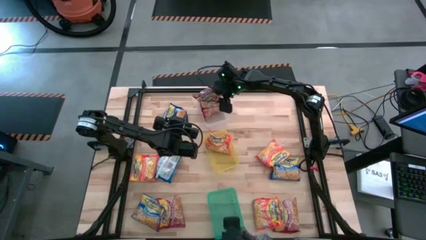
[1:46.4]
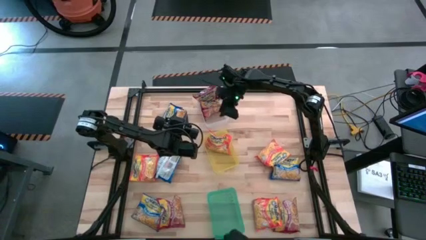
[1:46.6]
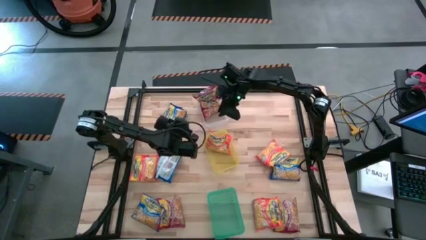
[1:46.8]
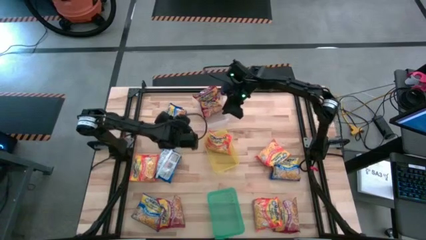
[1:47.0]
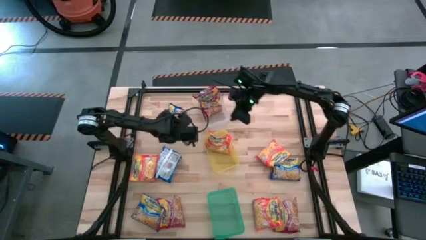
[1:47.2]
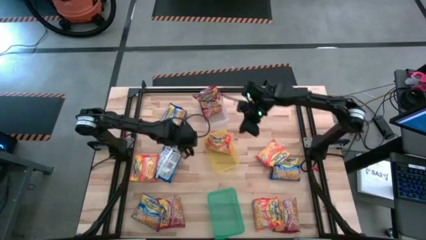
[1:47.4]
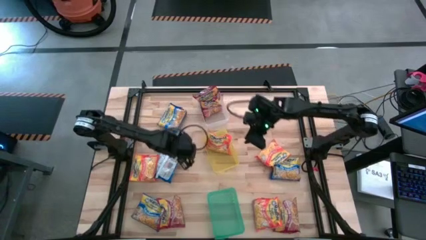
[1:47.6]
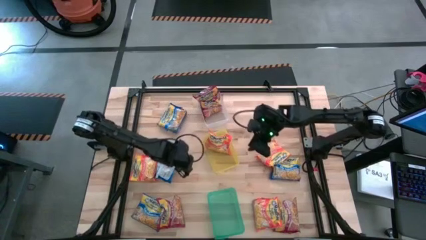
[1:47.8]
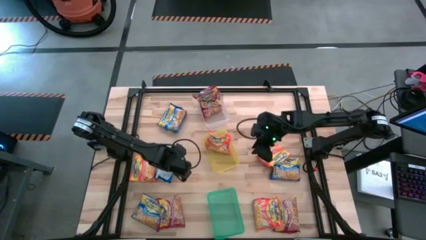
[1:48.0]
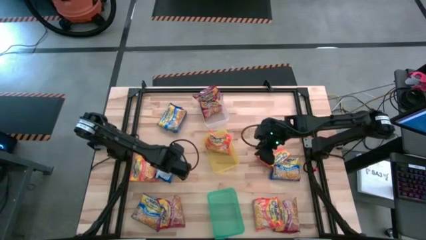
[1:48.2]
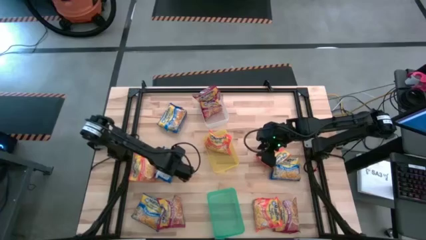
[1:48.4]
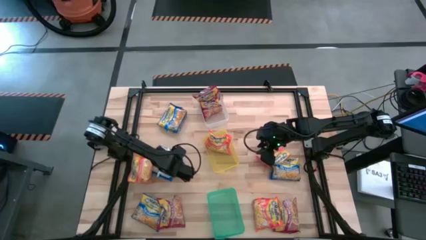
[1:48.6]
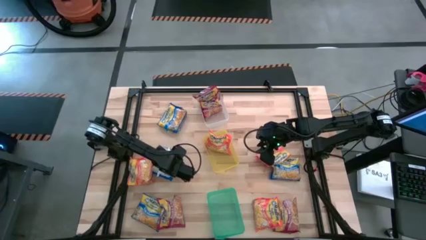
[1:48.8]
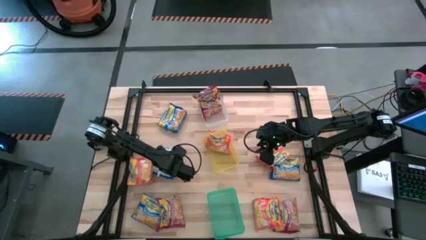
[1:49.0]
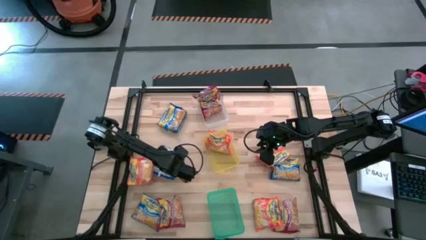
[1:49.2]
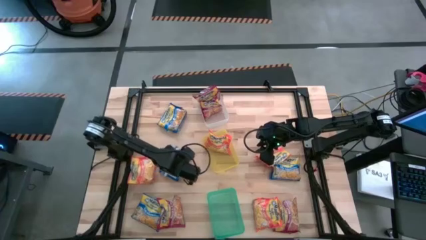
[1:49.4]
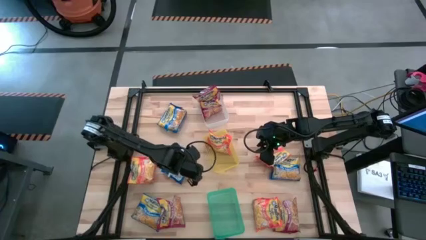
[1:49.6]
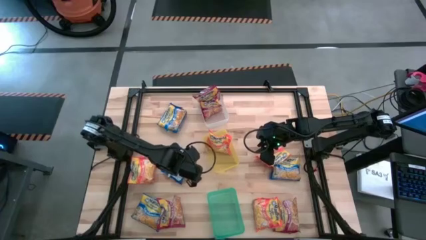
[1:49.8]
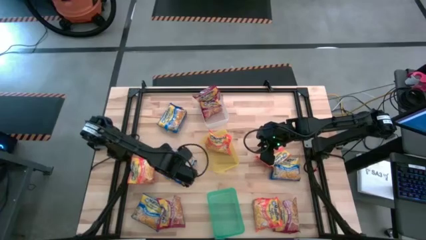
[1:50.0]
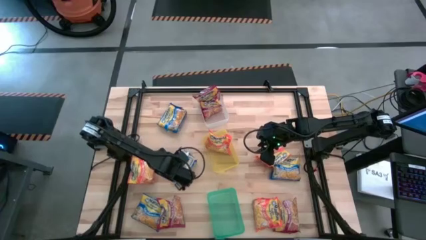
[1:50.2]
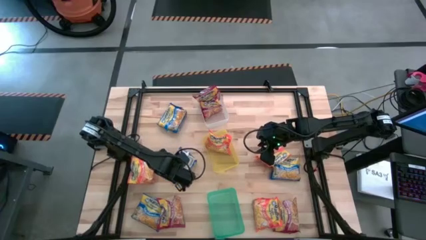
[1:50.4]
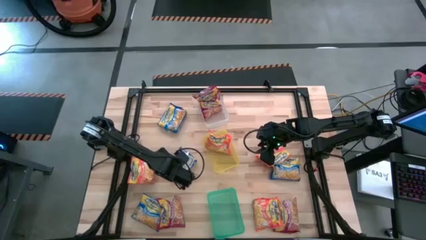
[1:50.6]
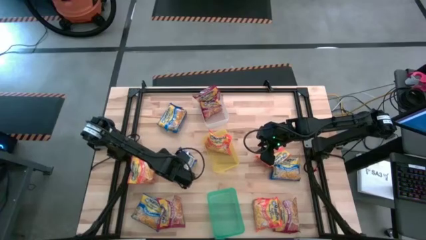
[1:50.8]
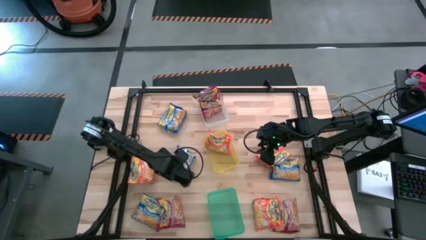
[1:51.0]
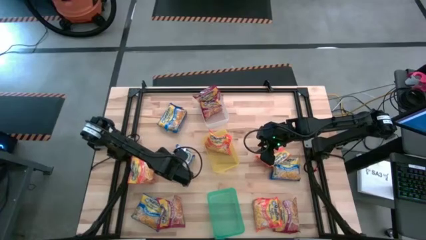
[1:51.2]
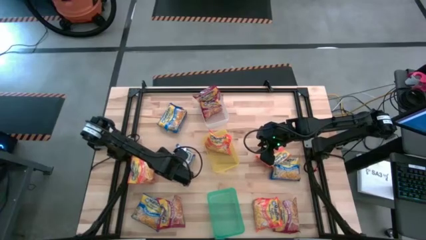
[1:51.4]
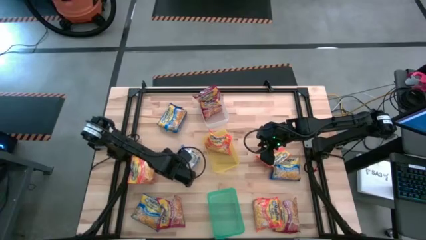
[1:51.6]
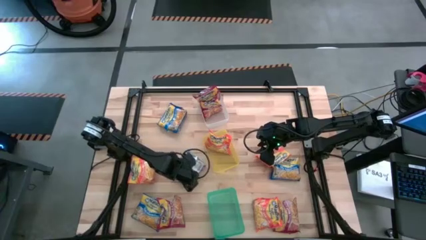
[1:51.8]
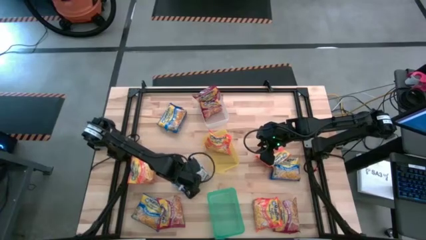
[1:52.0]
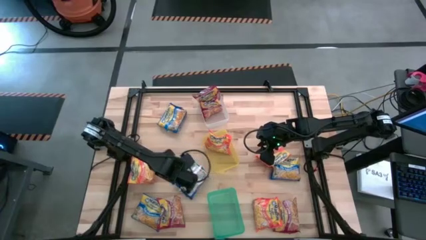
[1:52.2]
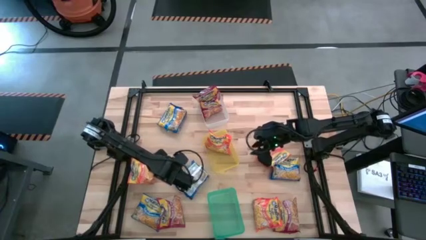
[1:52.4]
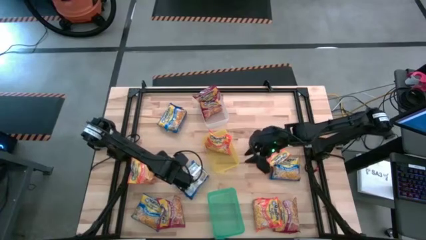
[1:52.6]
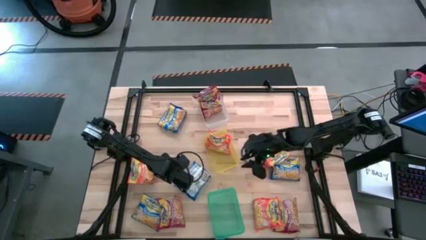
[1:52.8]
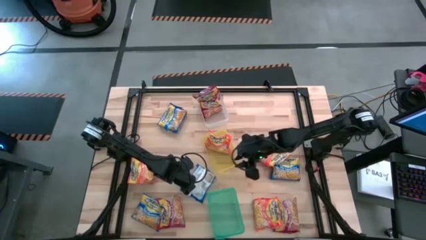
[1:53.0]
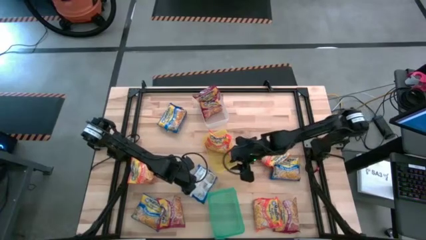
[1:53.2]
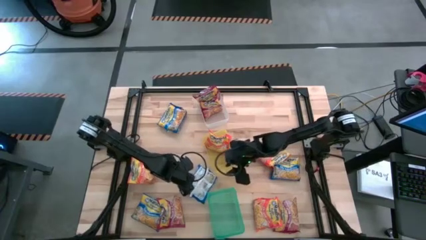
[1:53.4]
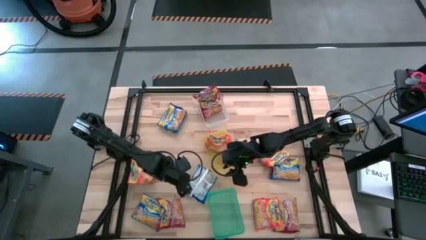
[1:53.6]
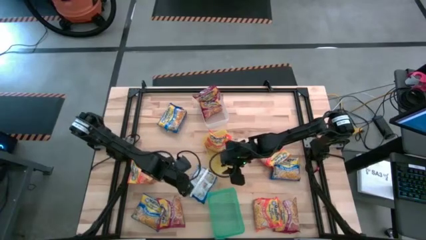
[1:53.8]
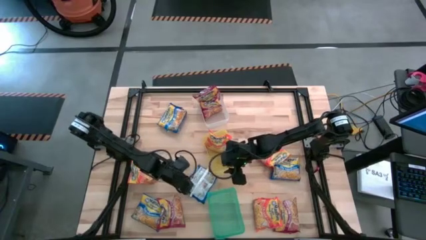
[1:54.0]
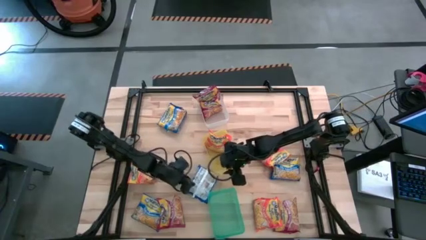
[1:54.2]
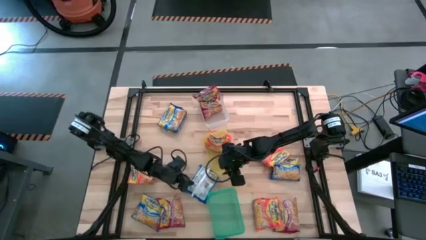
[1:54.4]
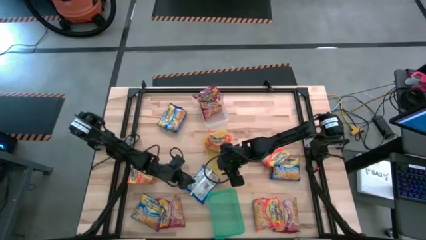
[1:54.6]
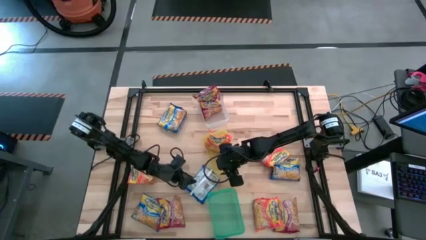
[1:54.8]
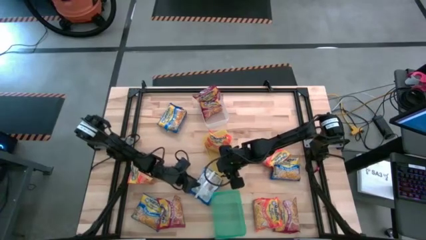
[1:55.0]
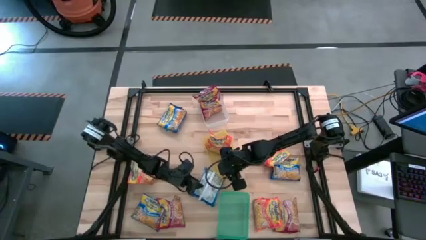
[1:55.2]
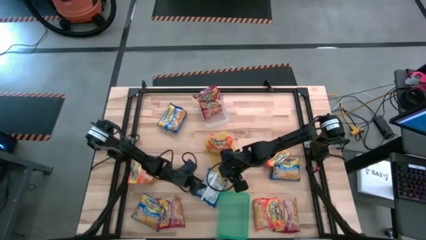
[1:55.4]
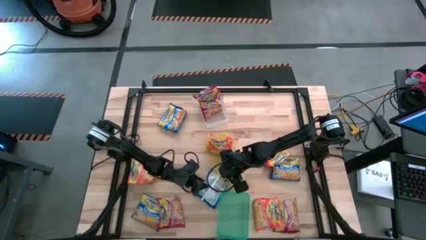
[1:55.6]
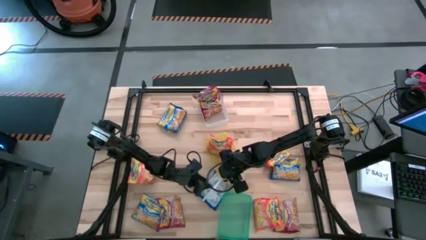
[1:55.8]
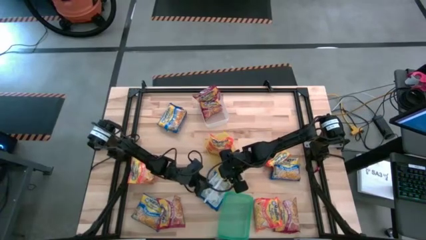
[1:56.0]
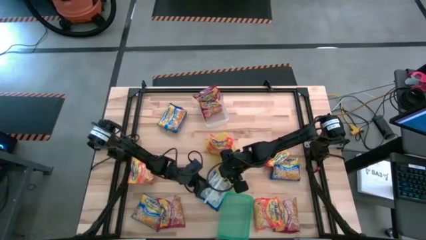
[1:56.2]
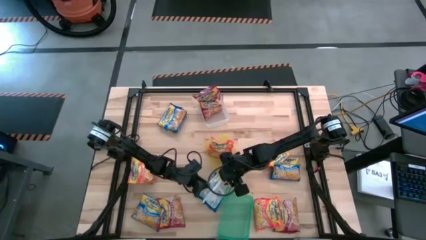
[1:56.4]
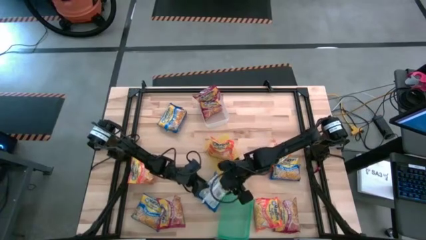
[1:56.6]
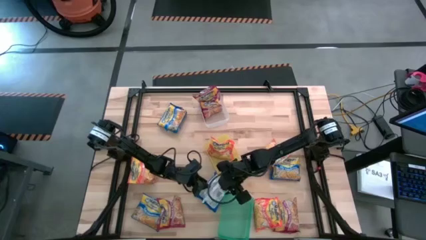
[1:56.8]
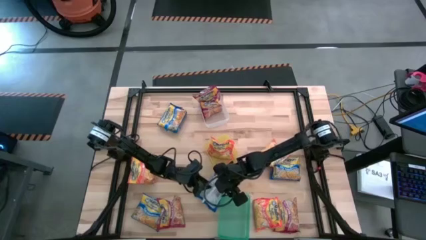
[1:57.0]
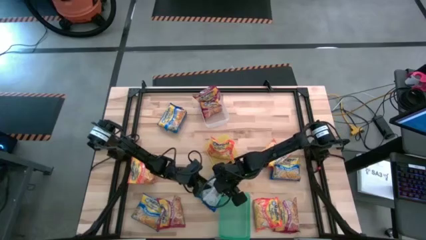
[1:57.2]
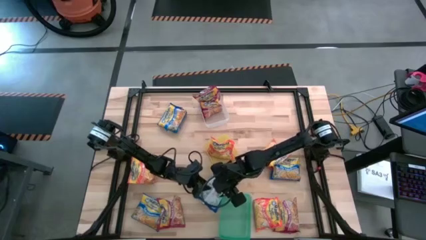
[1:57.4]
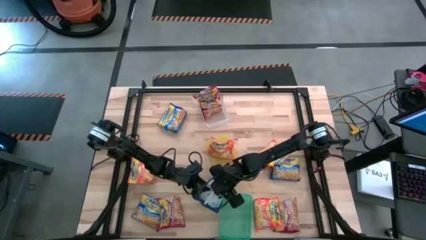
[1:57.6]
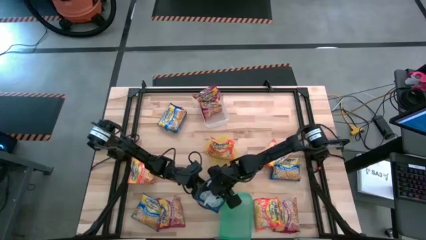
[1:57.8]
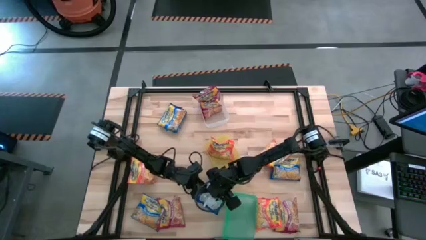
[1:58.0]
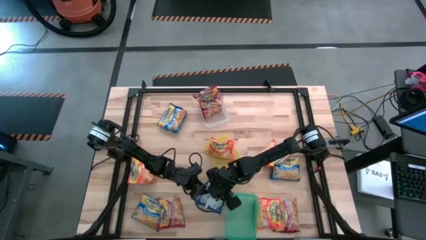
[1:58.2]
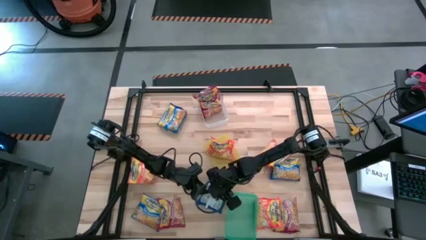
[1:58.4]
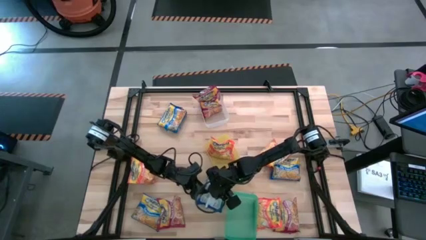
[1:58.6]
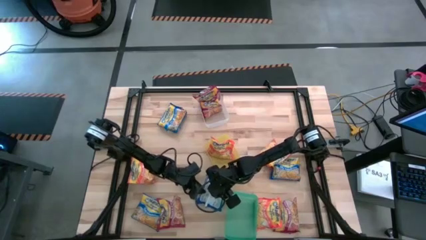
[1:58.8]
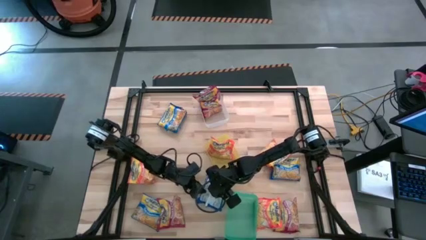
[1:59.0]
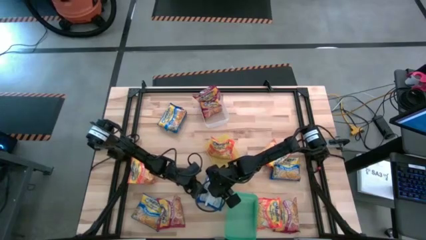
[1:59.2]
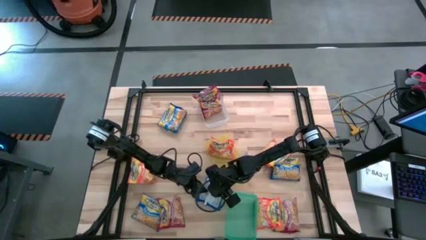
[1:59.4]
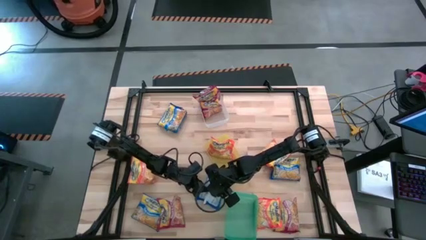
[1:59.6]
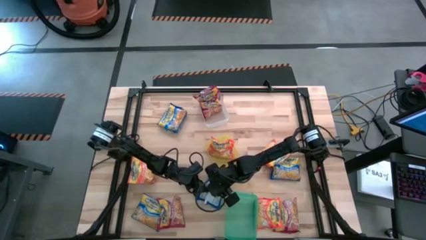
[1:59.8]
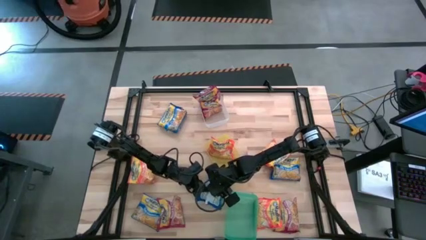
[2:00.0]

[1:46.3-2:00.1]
Task: Sort Maruchan noodles
Put the blue noodle pack into the green bin
